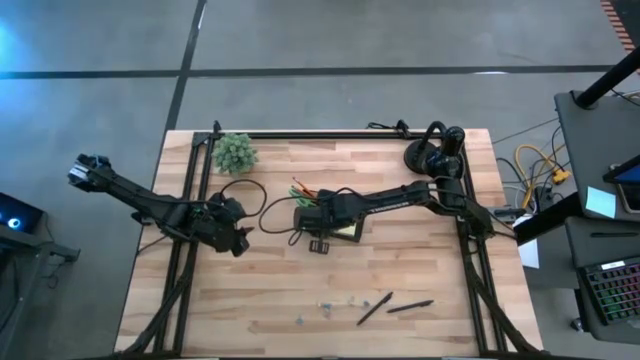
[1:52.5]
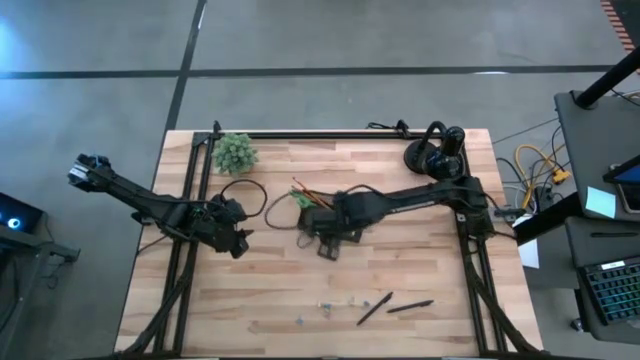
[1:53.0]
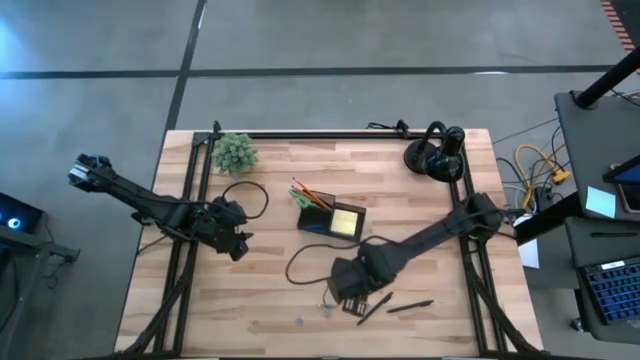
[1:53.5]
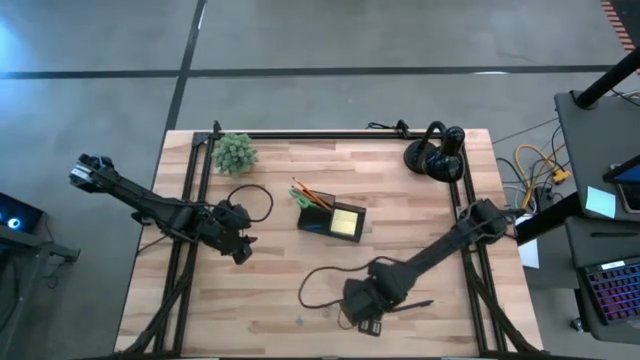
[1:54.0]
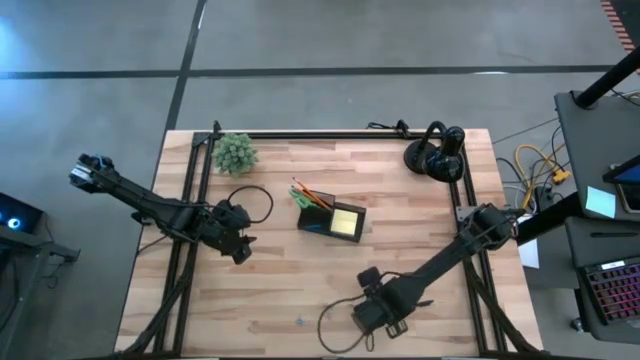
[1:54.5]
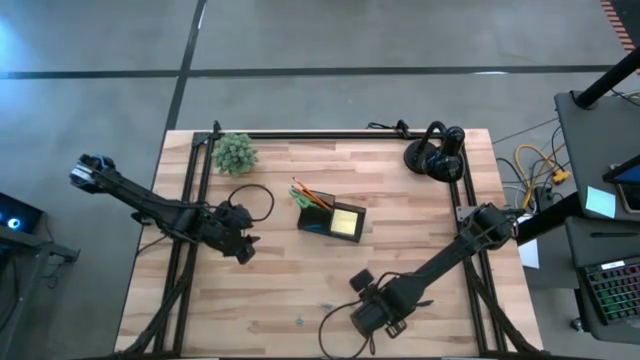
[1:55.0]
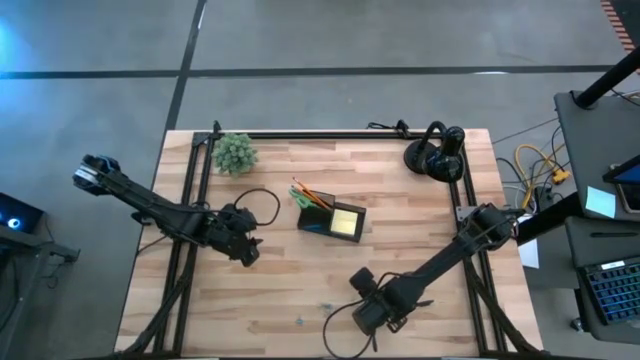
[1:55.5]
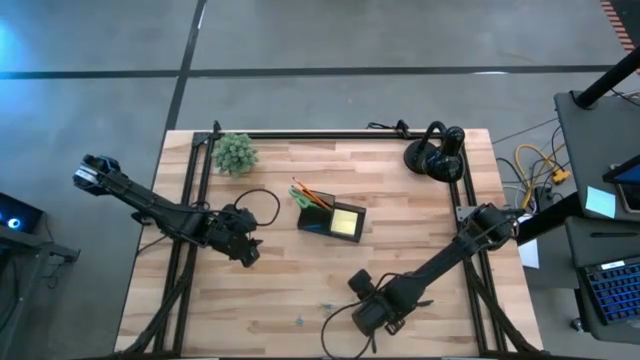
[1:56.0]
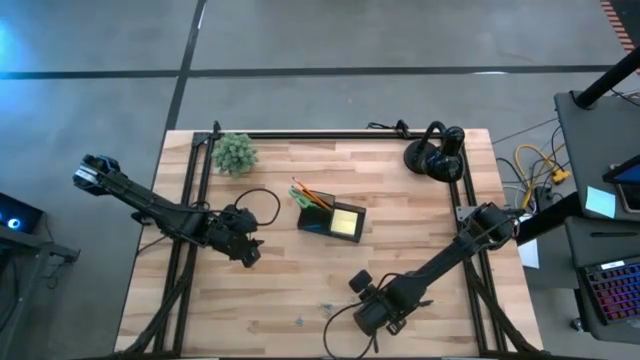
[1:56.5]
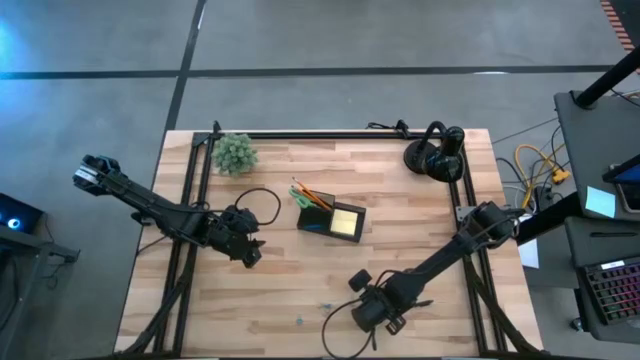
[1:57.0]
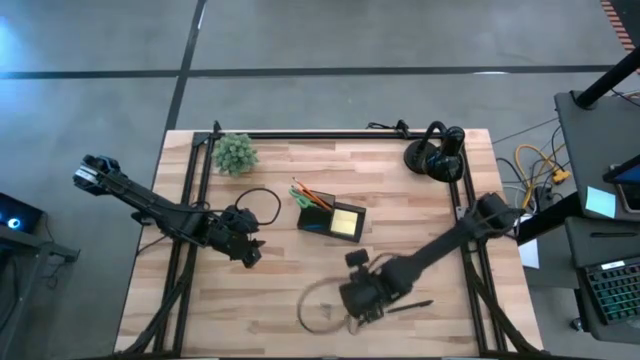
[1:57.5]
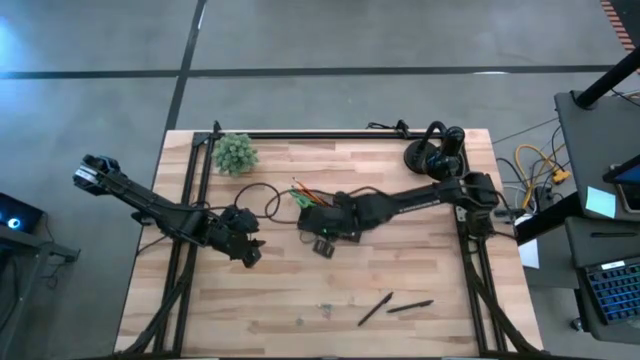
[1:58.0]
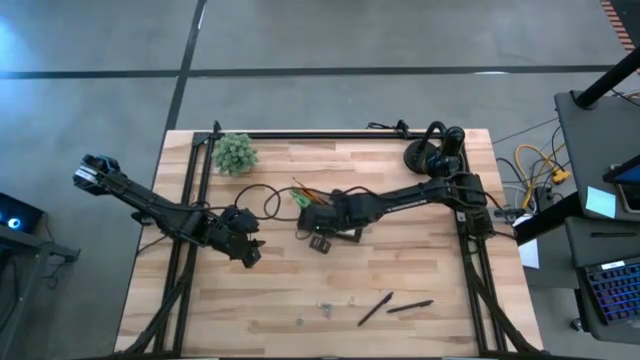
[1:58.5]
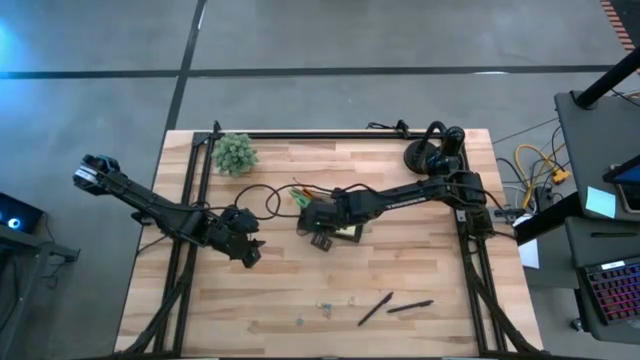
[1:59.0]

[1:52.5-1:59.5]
Task: Pick and place office supplies into organizer
Put the right blue binder clip into the black desk organizer

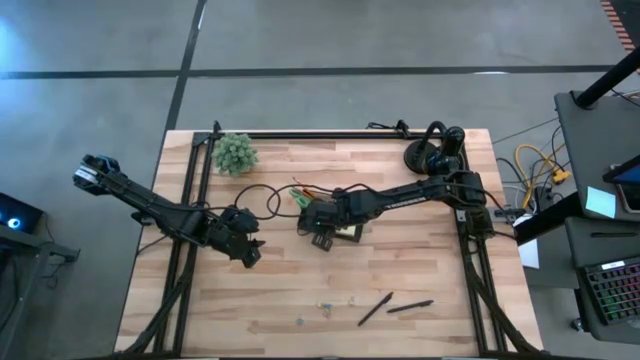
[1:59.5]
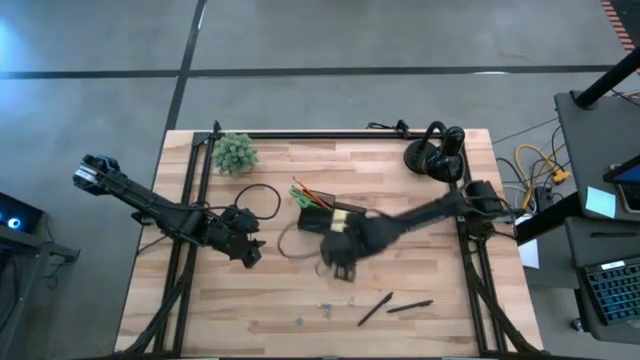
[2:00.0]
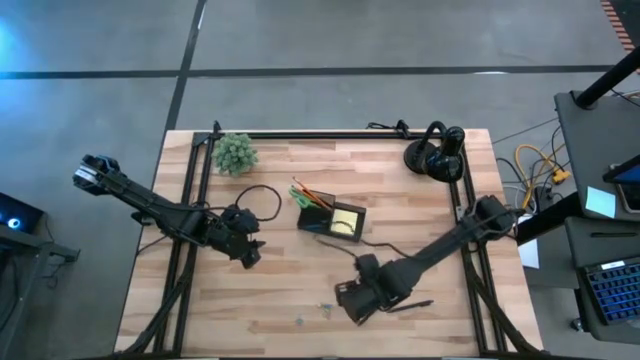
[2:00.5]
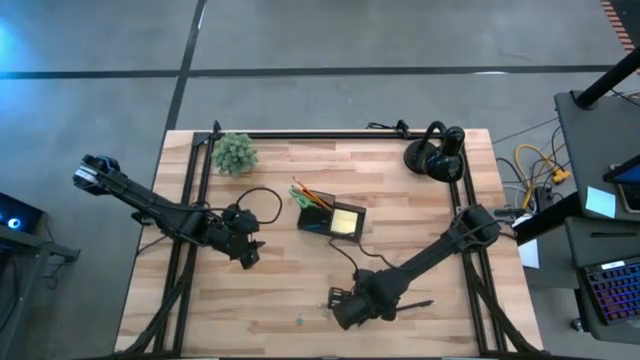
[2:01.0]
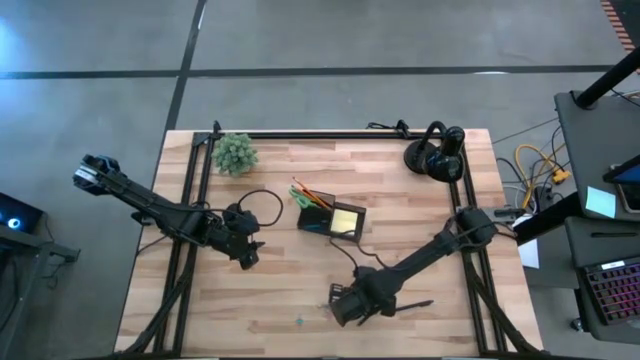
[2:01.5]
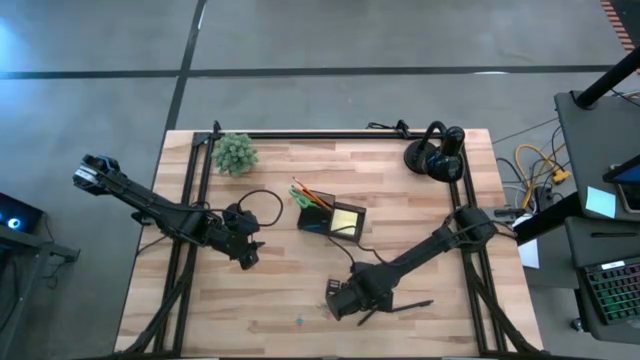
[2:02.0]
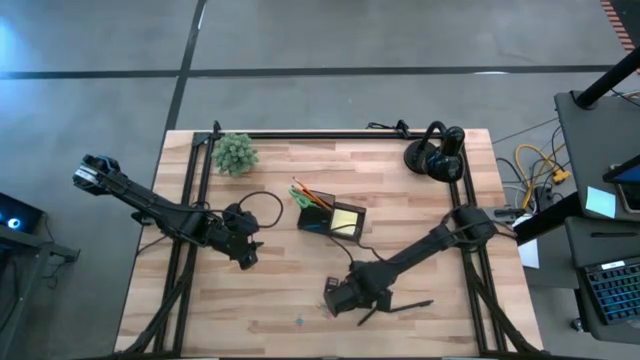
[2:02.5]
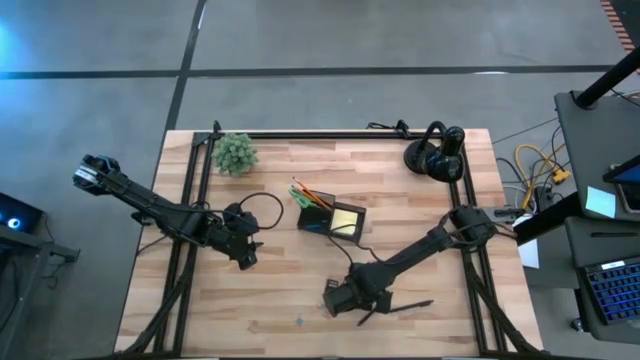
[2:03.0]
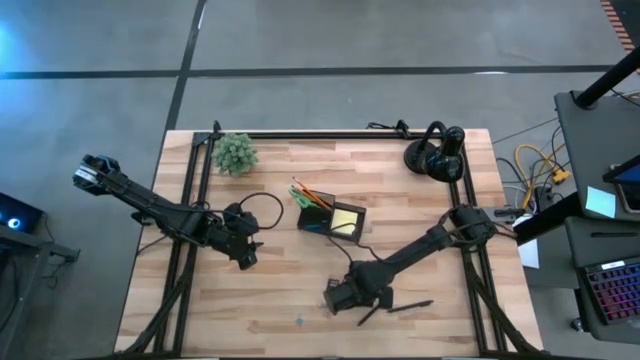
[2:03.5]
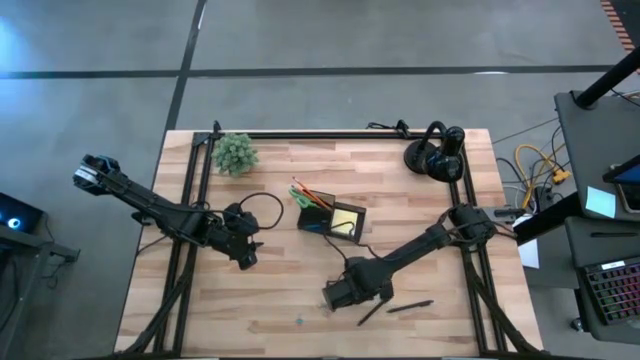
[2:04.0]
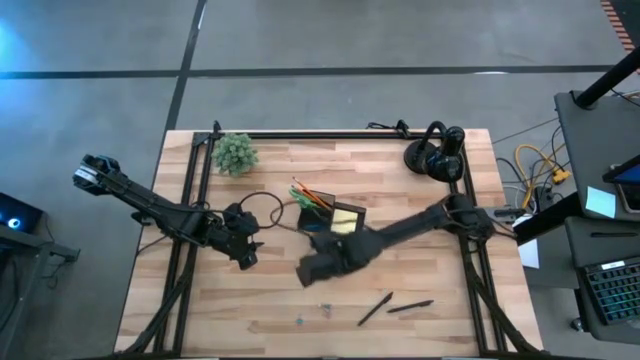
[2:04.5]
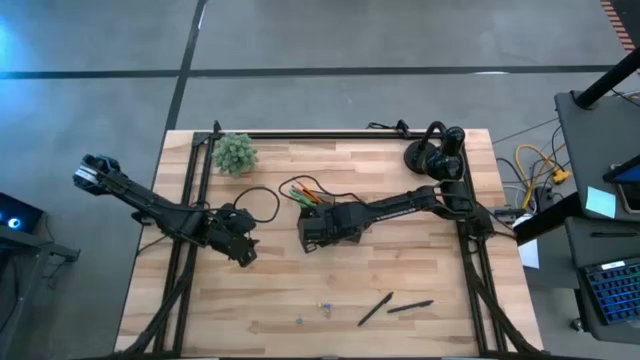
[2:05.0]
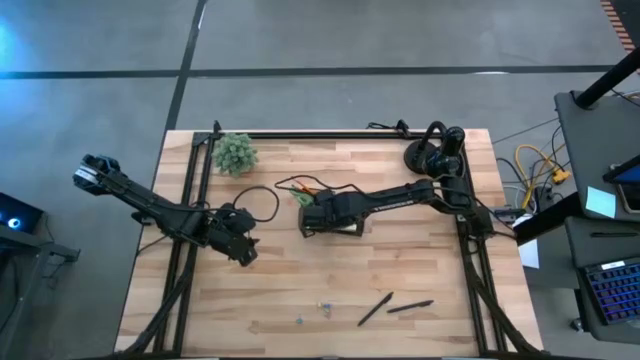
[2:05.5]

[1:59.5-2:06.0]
Put the right yellow binder clip into the black desk organizer

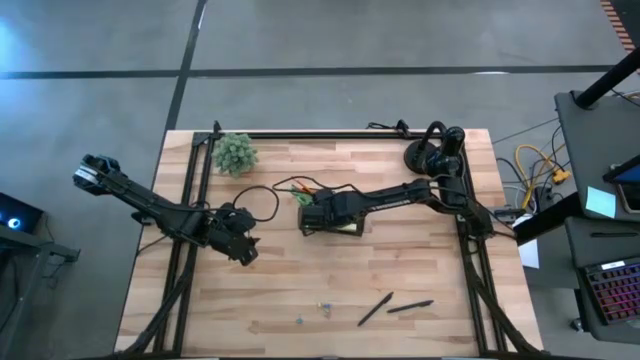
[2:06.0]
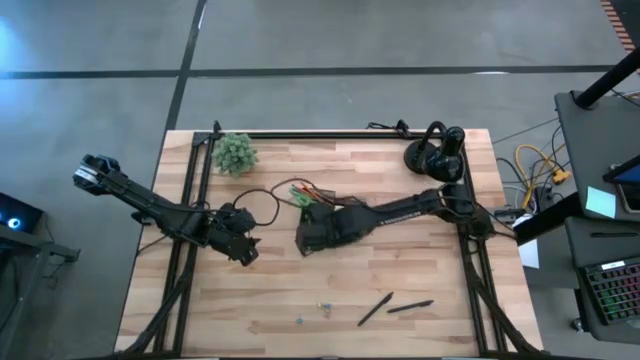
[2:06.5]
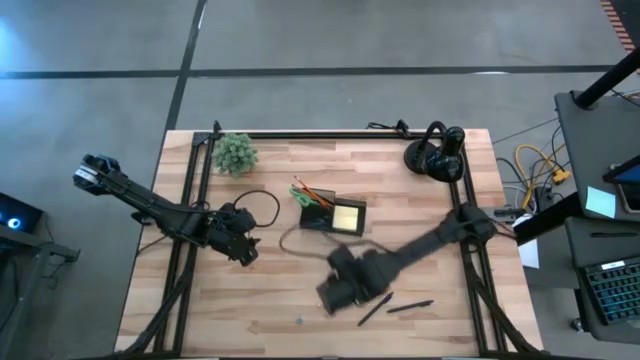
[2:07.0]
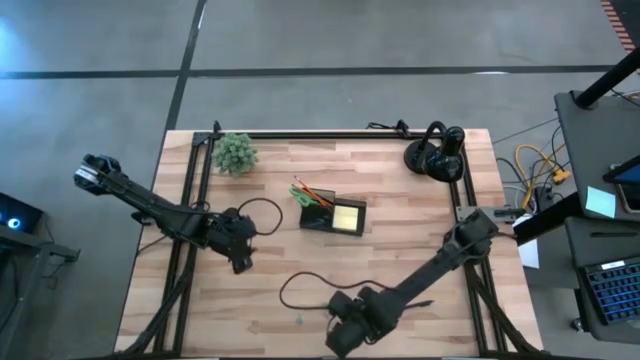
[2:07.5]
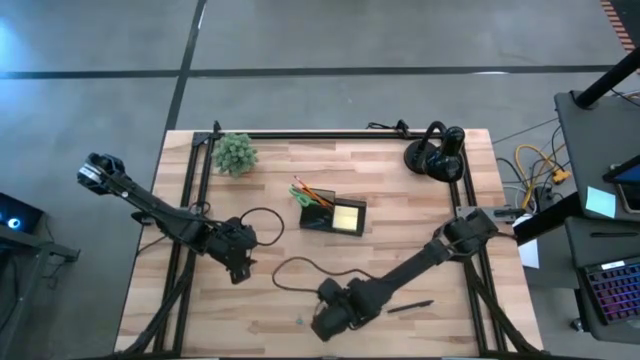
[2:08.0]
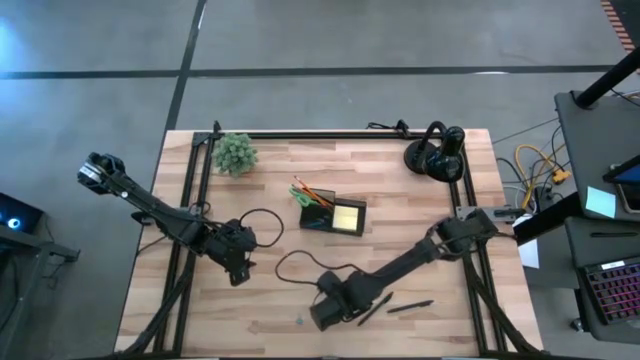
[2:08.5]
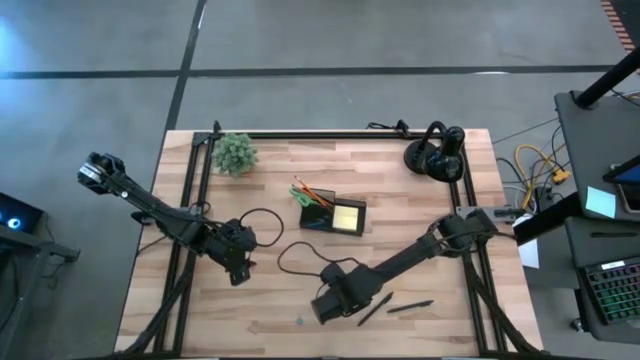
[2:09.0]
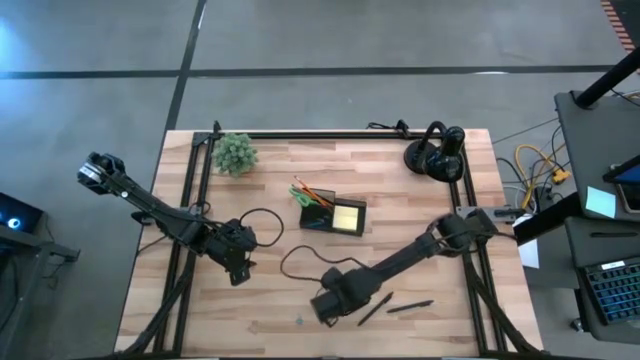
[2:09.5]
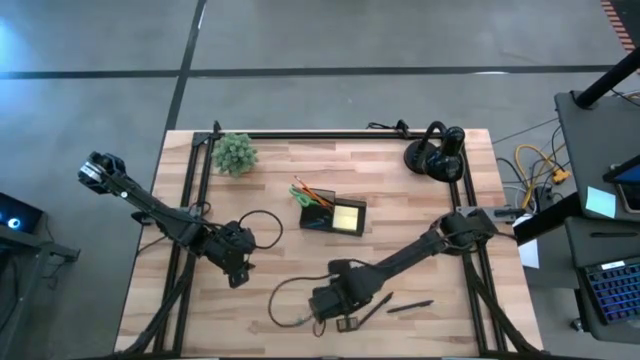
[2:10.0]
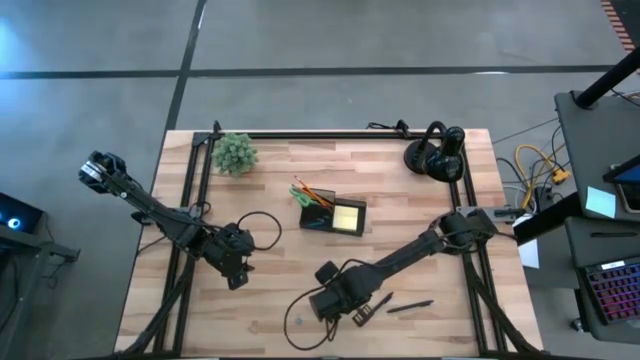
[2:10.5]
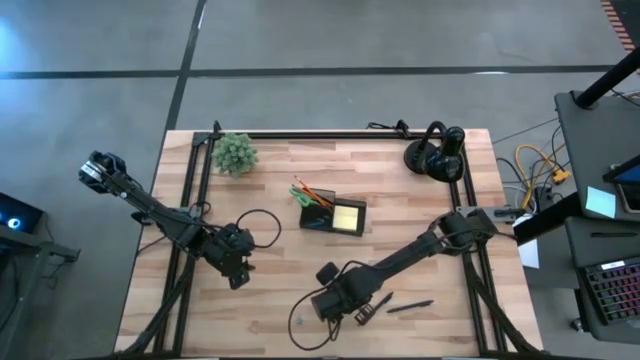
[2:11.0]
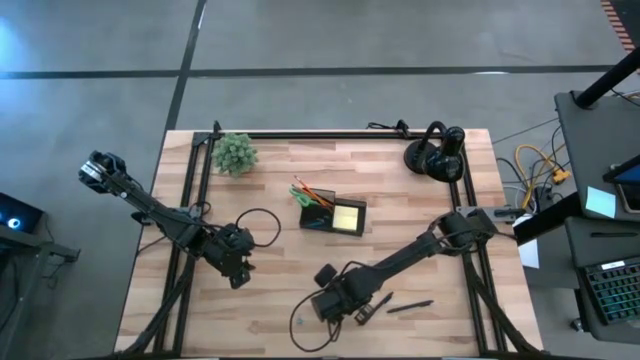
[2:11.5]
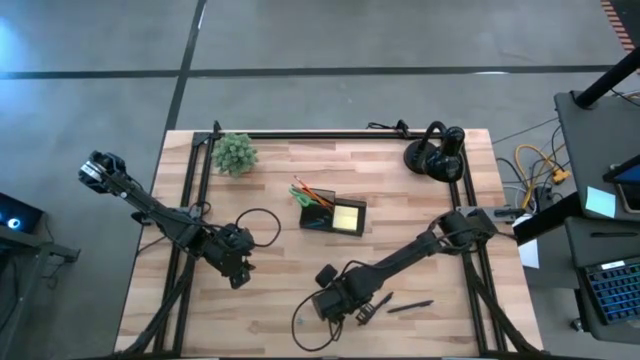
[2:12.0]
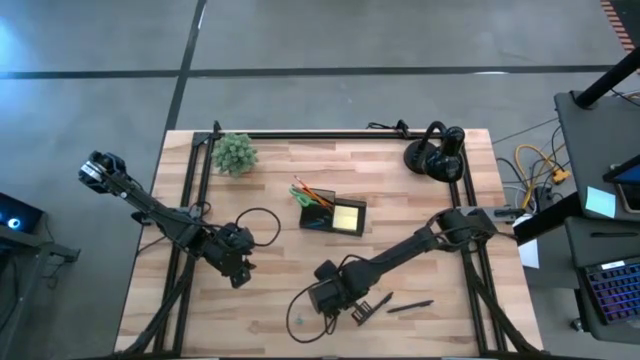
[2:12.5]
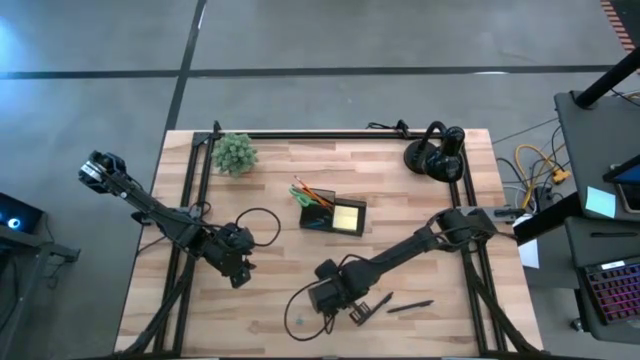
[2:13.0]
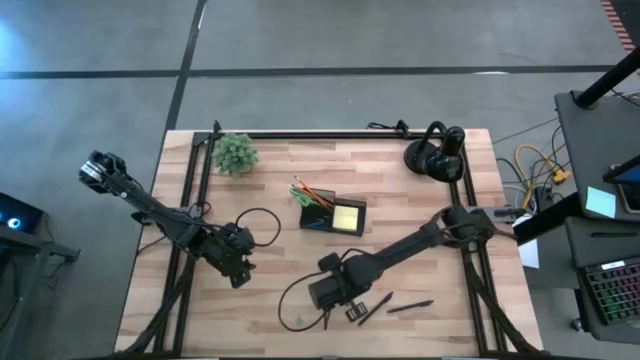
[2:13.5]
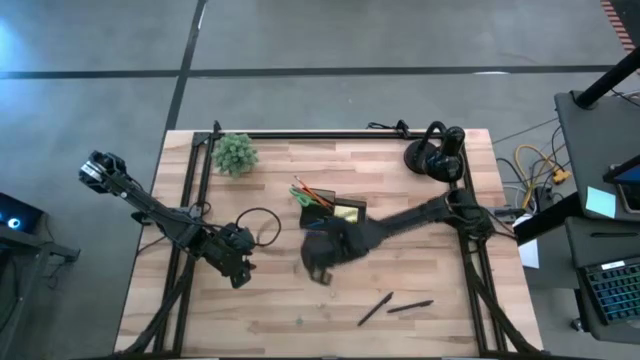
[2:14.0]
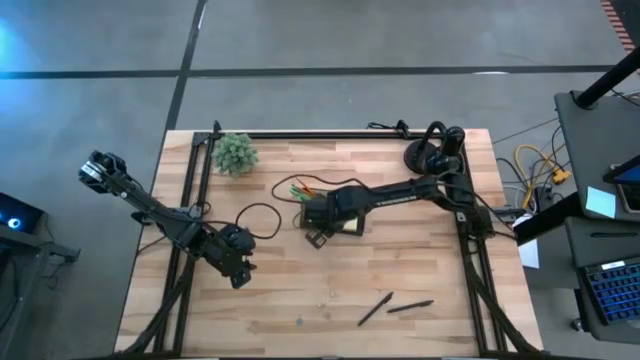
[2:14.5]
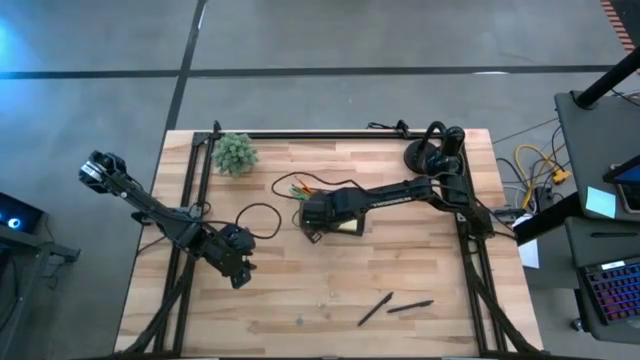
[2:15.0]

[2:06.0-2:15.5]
Put the right blue binder clip into the black desk organizer
